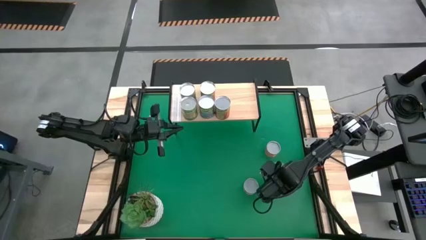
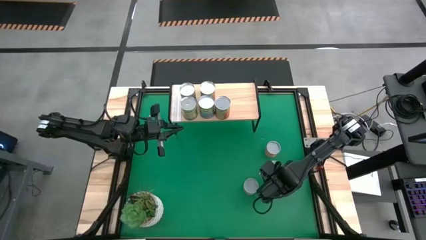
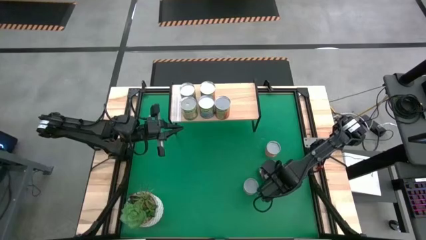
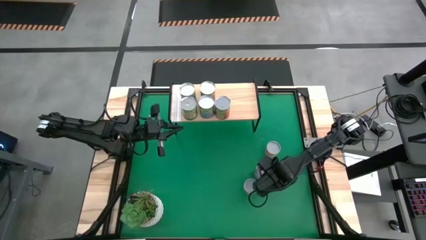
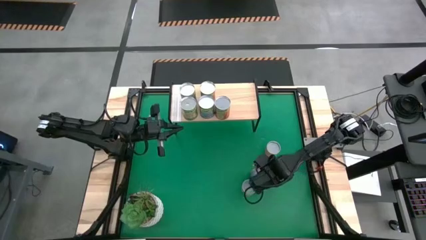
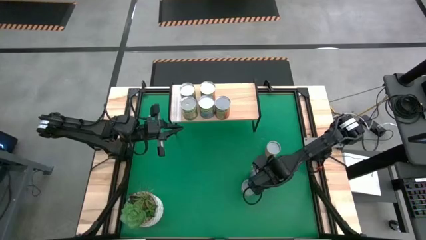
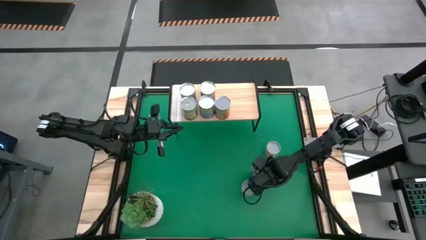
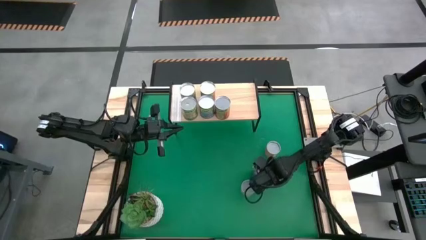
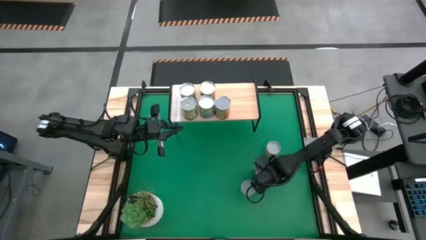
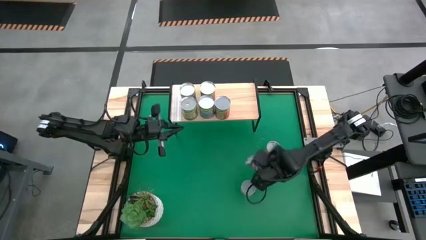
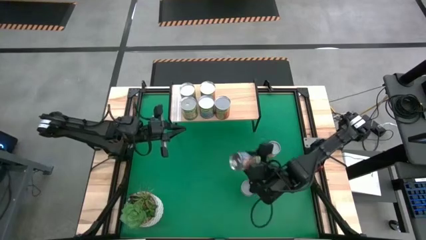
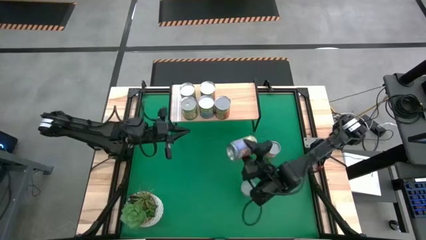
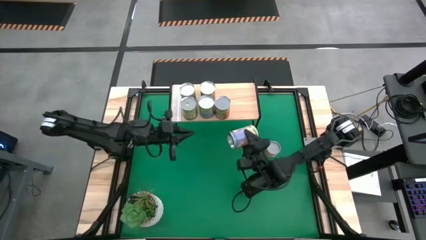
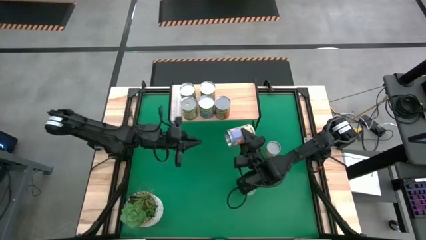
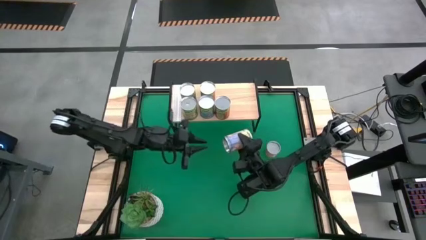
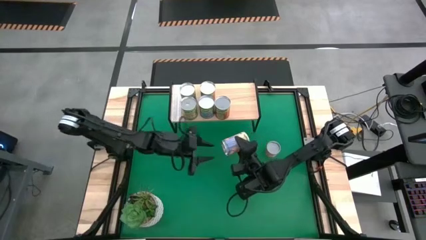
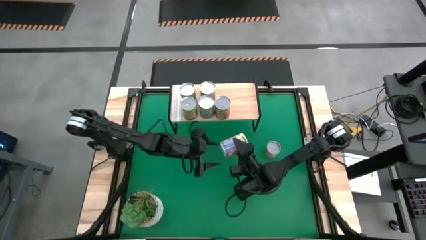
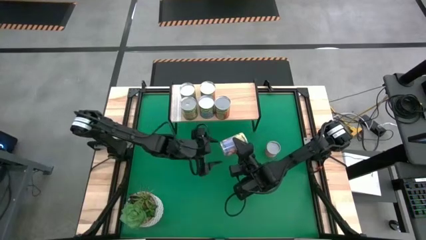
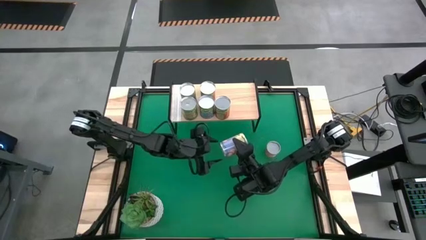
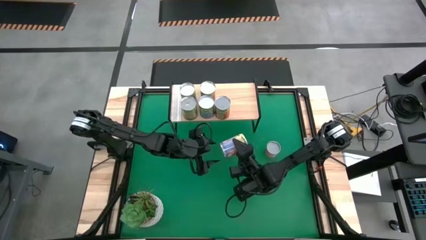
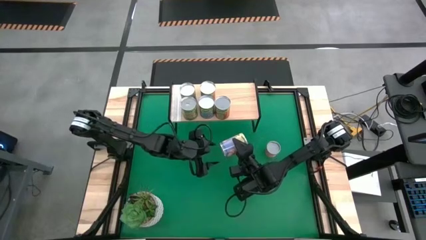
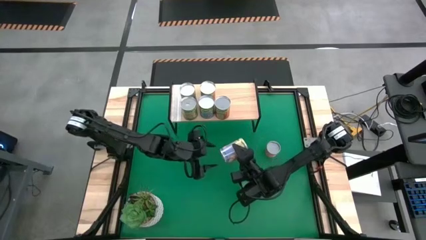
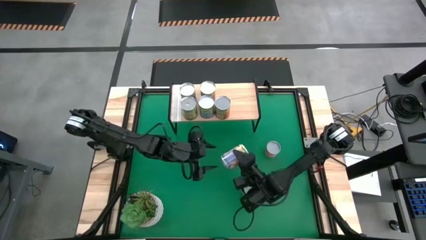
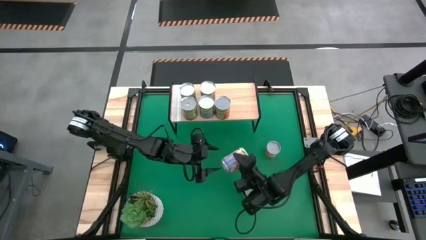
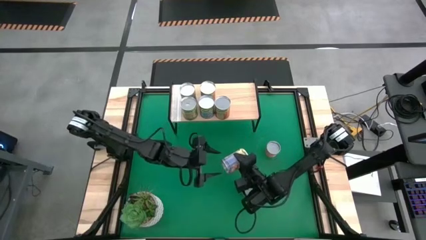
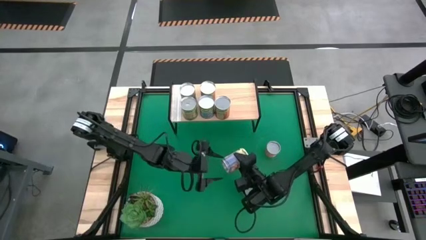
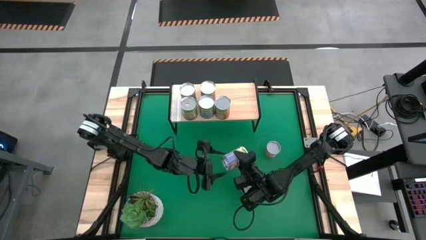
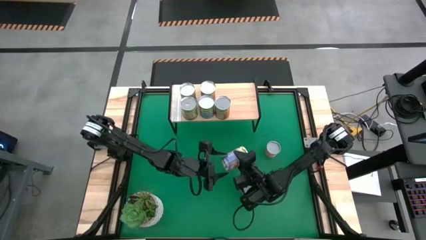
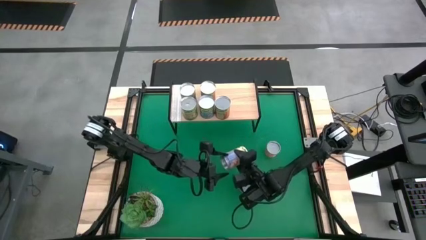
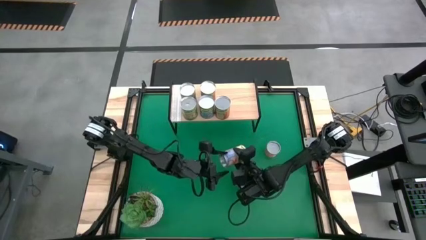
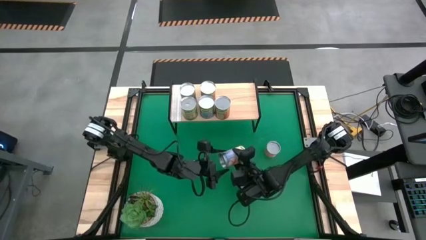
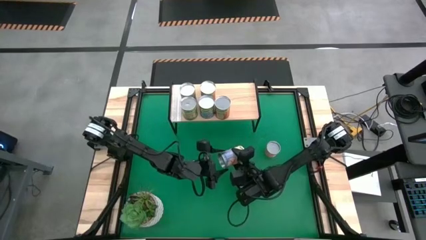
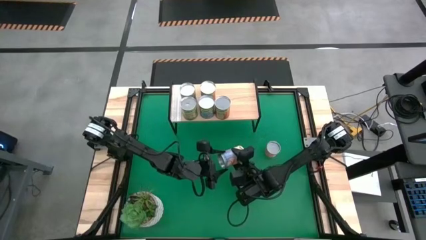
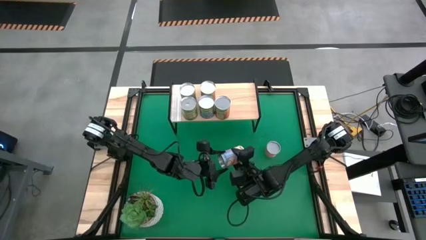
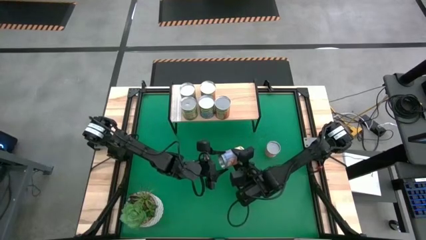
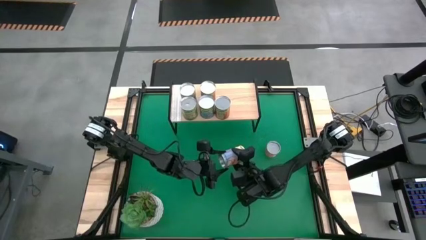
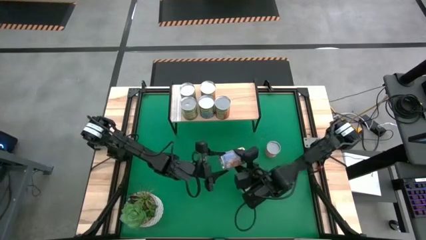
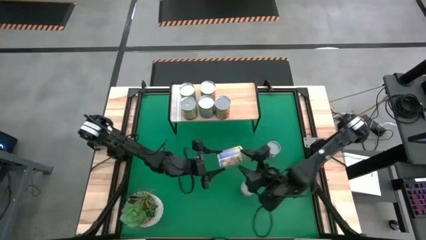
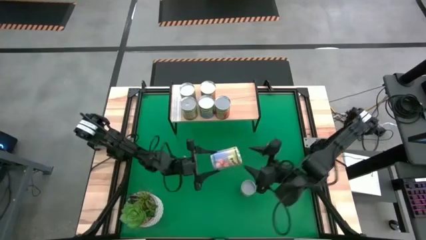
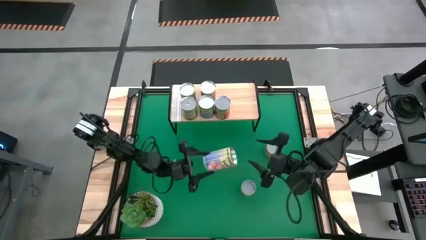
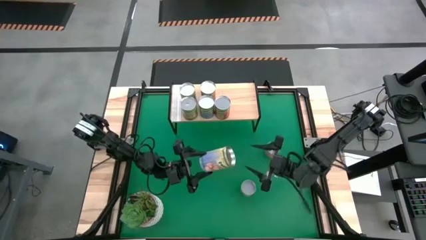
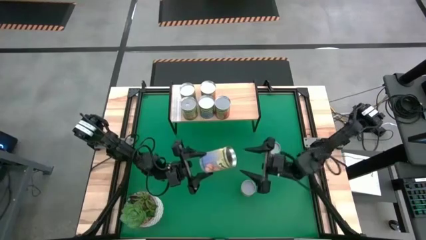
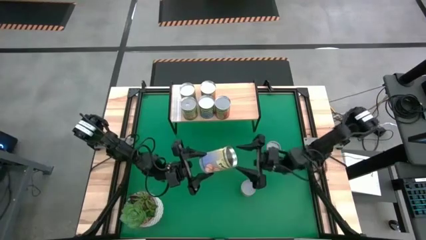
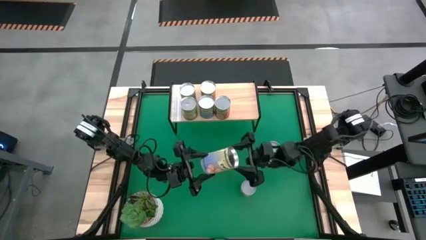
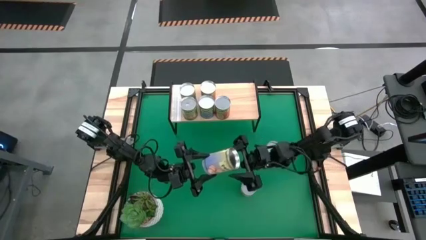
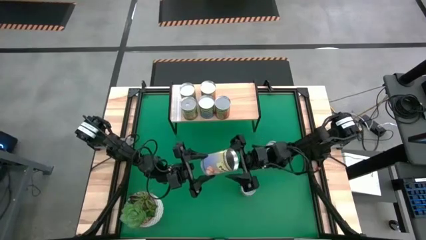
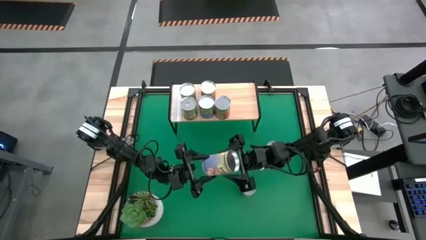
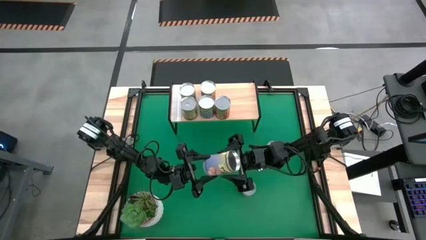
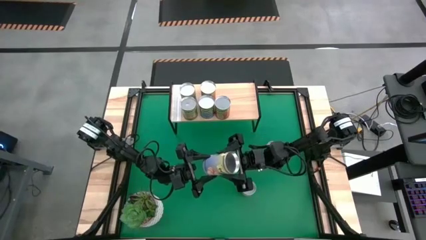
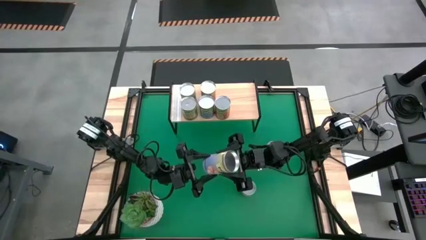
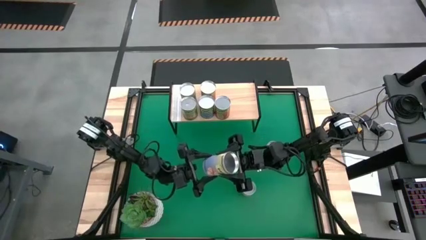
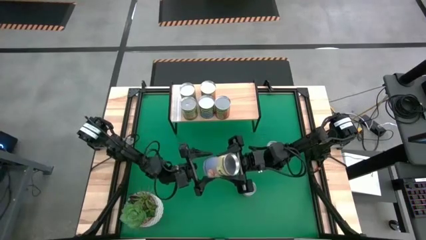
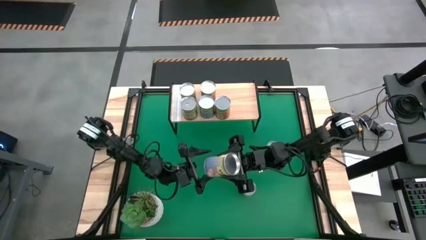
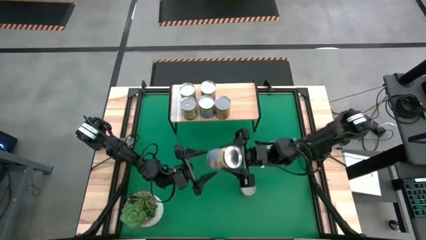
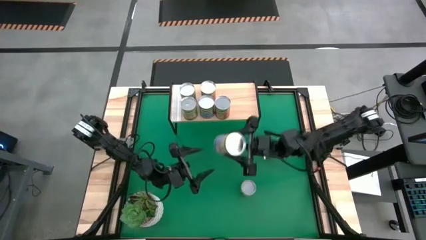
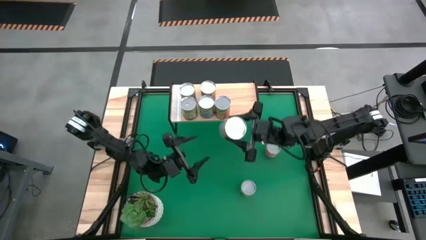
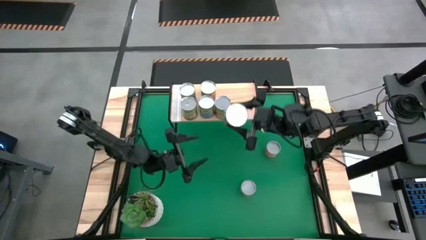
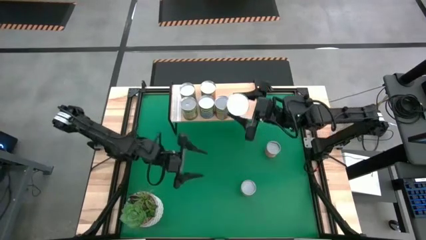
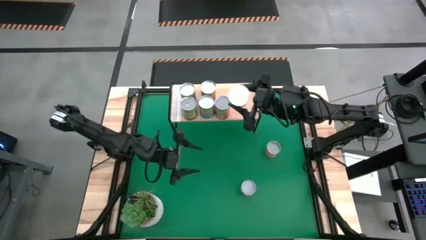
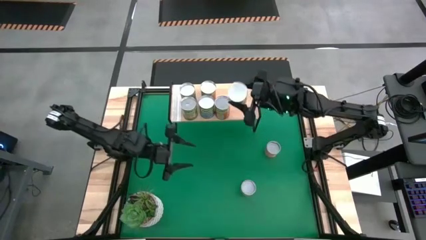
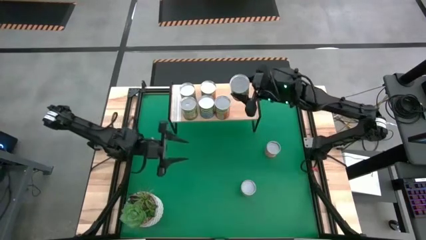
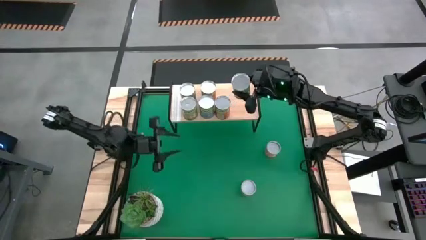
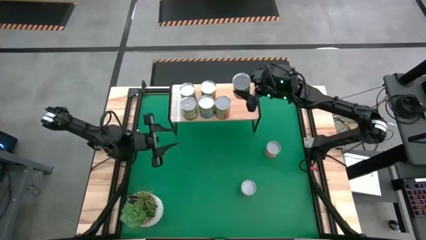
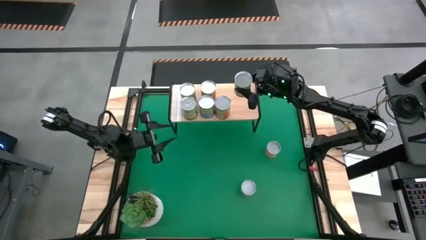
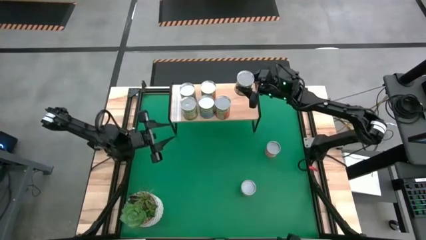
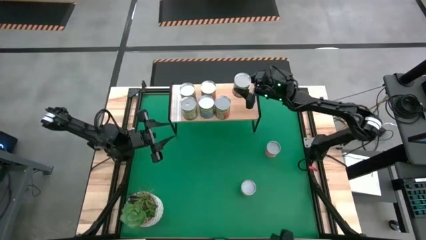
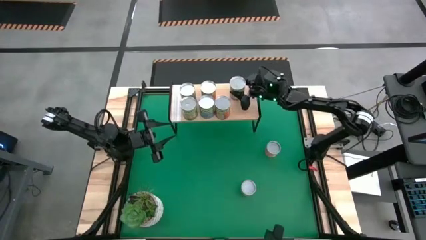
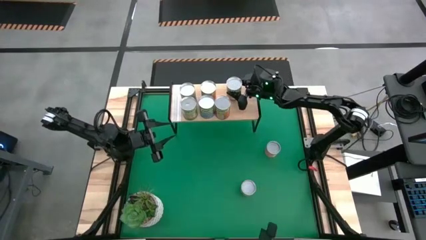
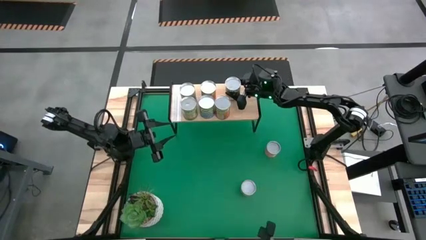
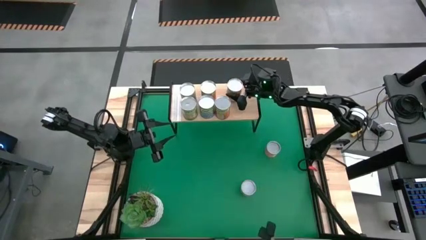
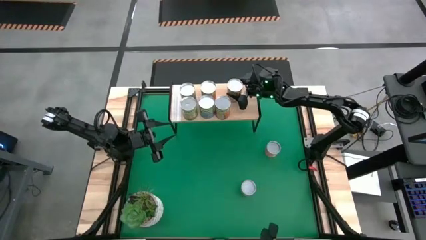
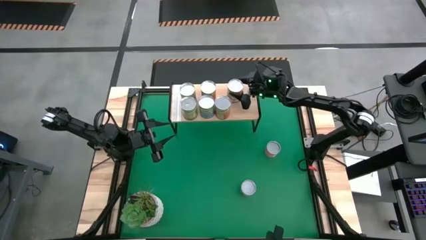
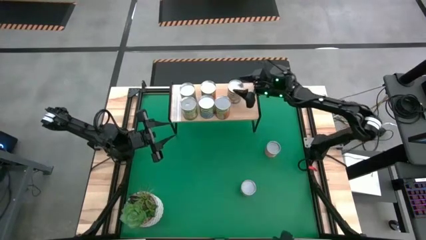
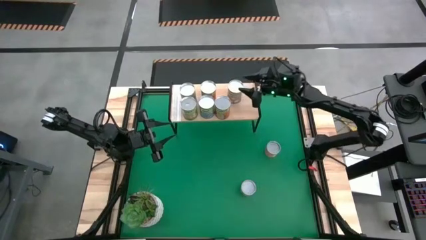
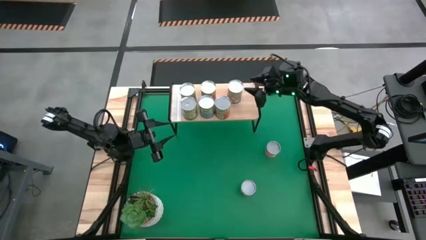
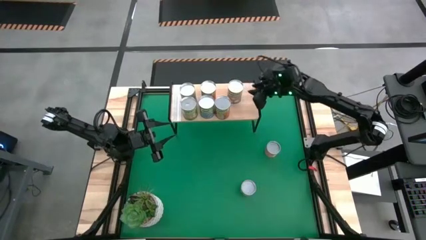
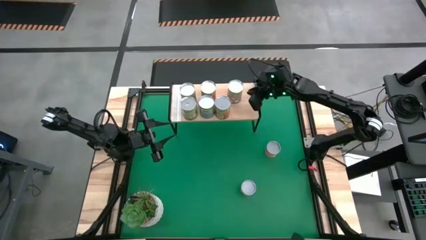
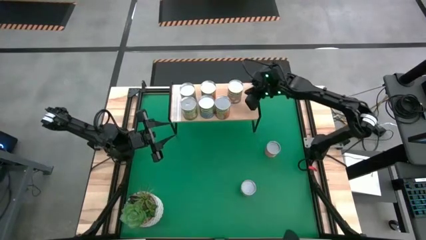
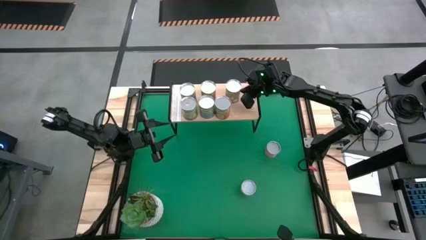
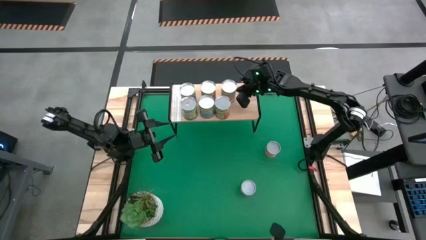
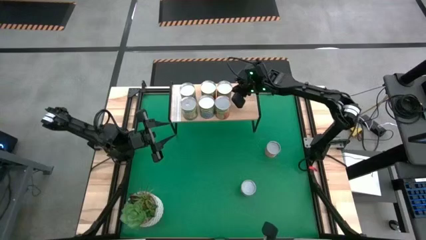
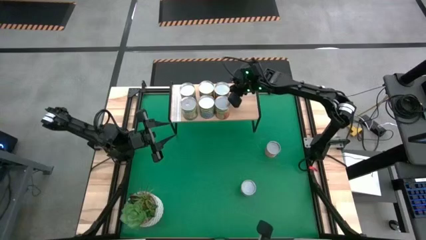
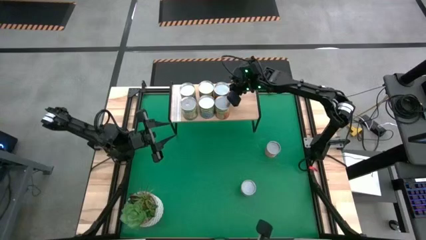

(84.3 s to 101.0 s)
Task: Pick and place cans onto a shelf
Put the canned peaches on the shelf
